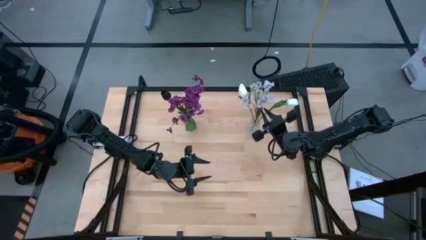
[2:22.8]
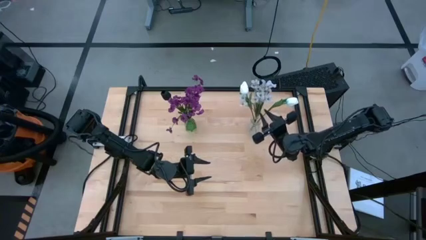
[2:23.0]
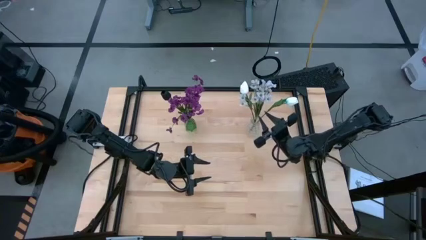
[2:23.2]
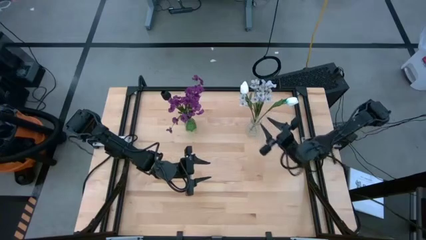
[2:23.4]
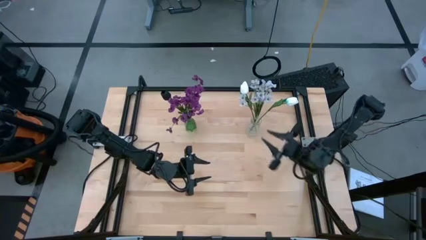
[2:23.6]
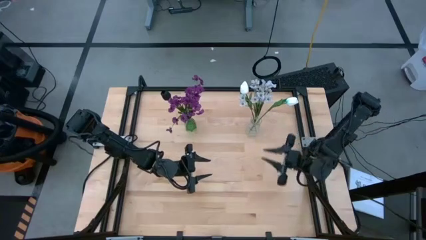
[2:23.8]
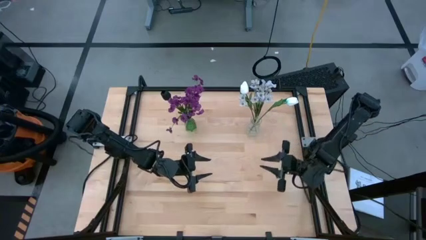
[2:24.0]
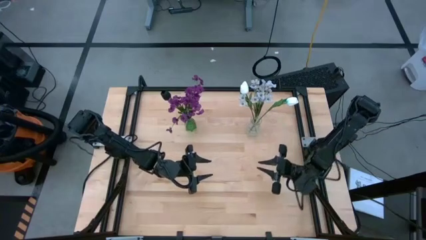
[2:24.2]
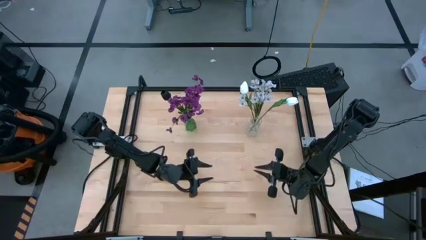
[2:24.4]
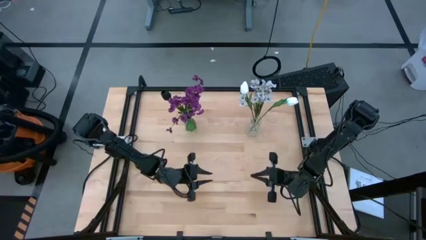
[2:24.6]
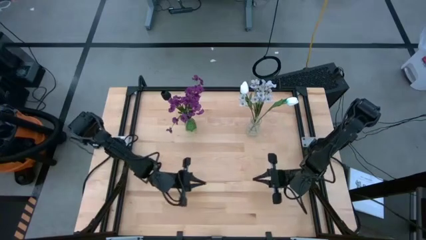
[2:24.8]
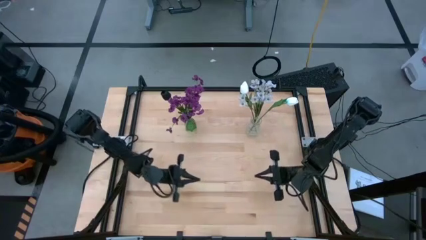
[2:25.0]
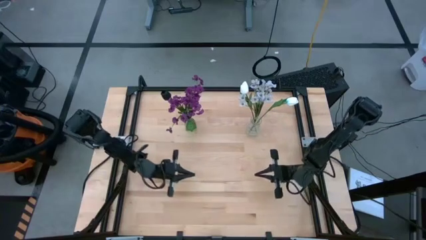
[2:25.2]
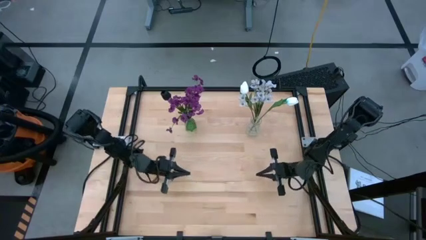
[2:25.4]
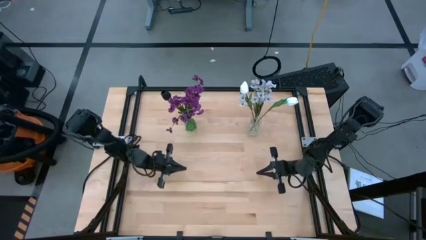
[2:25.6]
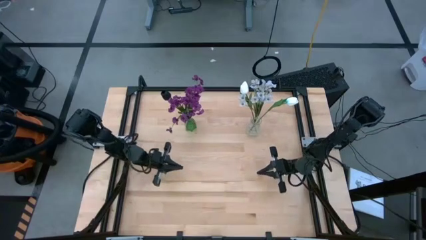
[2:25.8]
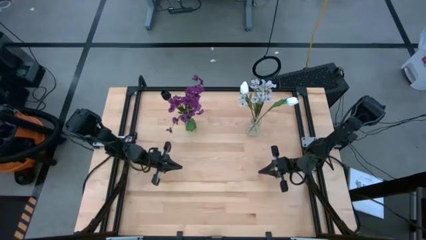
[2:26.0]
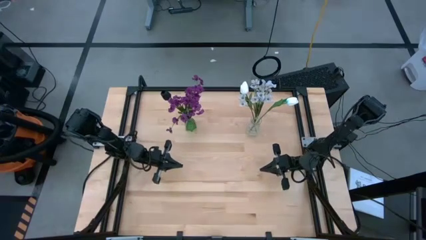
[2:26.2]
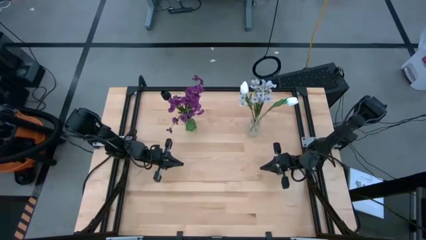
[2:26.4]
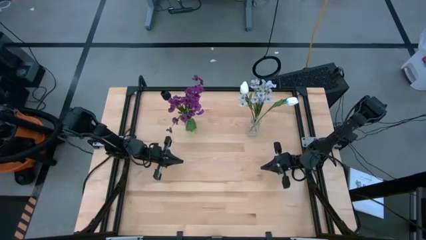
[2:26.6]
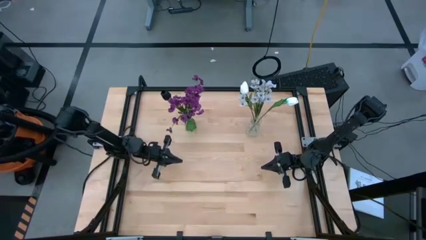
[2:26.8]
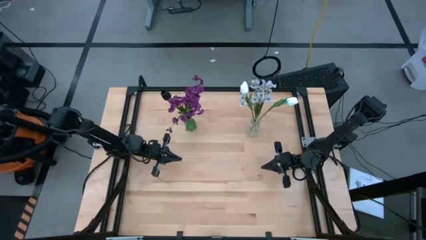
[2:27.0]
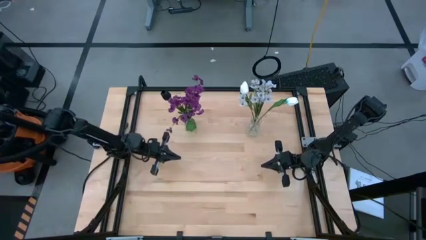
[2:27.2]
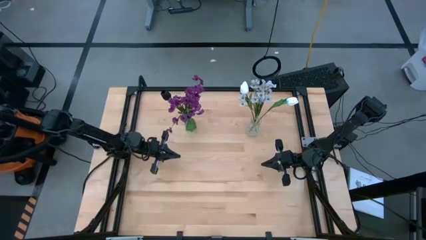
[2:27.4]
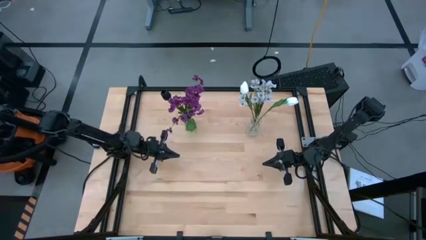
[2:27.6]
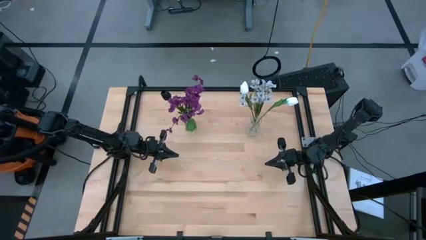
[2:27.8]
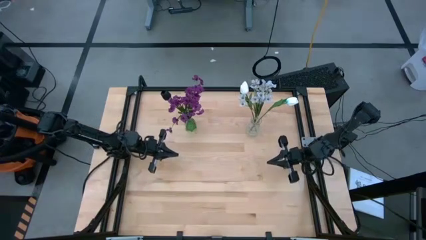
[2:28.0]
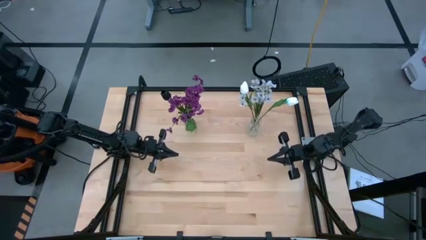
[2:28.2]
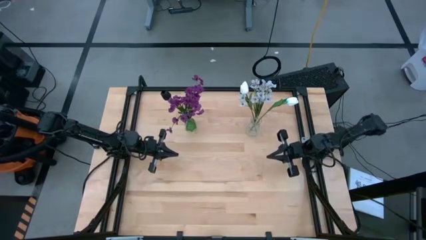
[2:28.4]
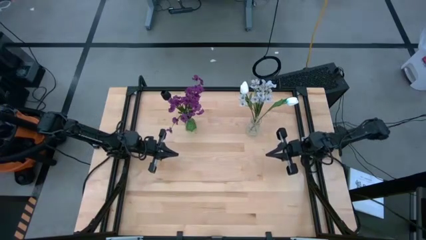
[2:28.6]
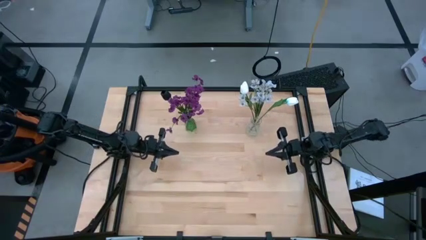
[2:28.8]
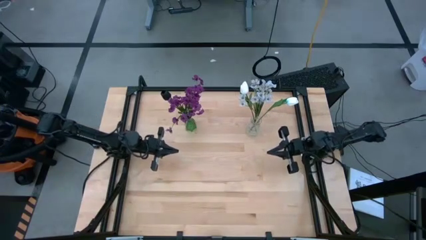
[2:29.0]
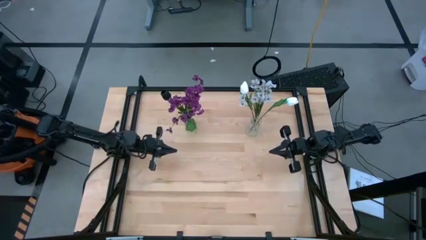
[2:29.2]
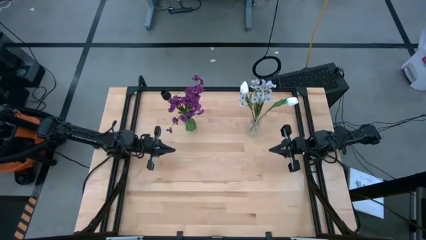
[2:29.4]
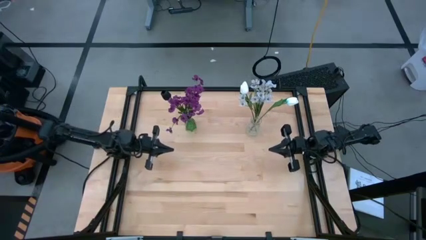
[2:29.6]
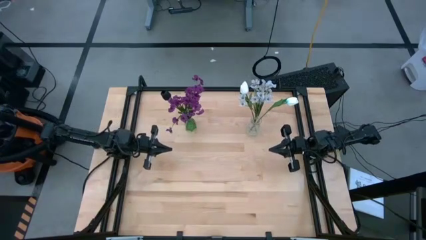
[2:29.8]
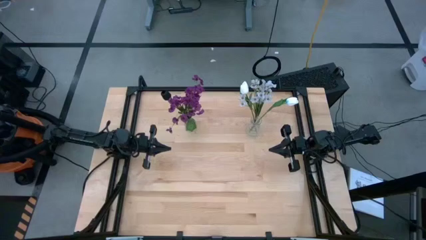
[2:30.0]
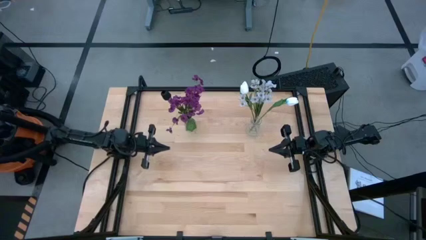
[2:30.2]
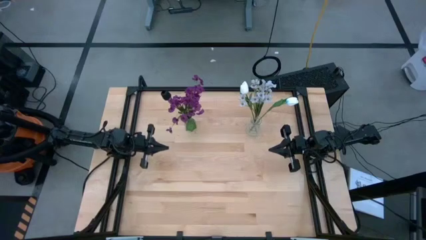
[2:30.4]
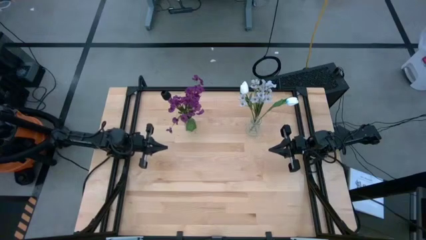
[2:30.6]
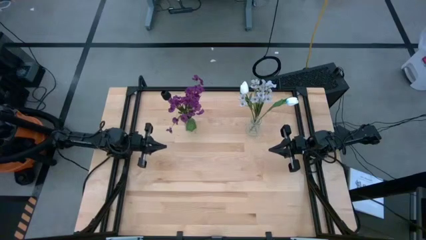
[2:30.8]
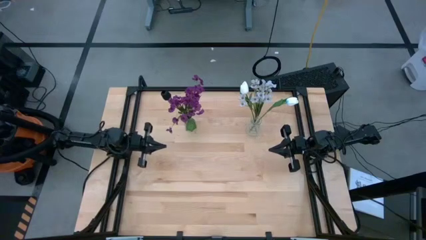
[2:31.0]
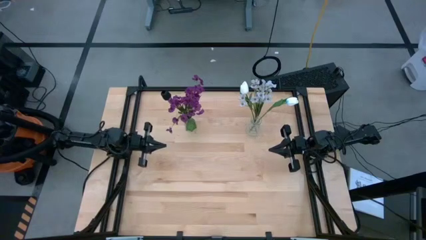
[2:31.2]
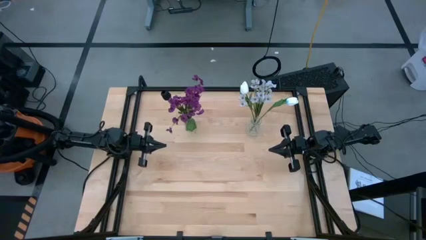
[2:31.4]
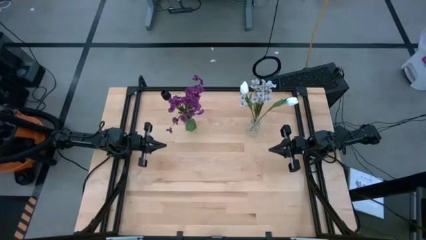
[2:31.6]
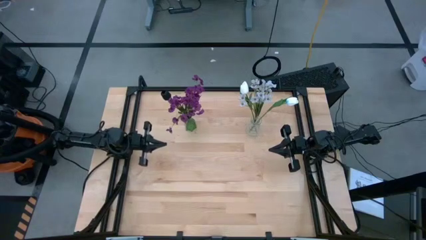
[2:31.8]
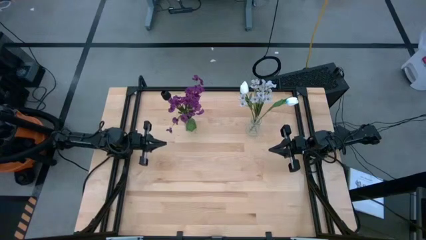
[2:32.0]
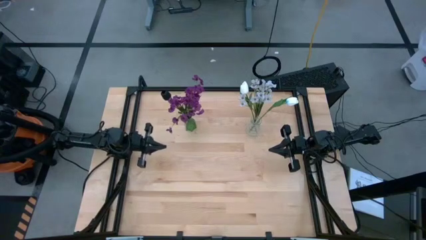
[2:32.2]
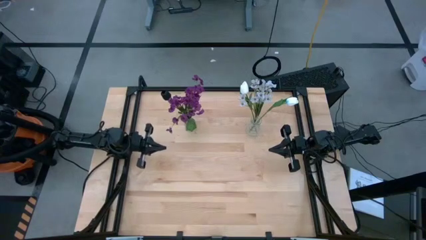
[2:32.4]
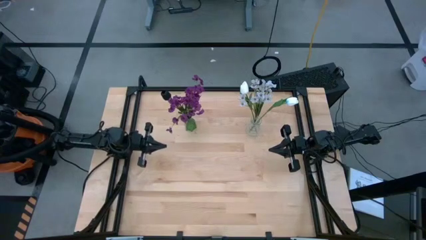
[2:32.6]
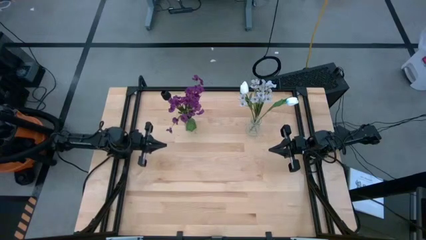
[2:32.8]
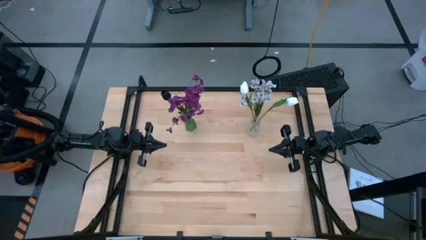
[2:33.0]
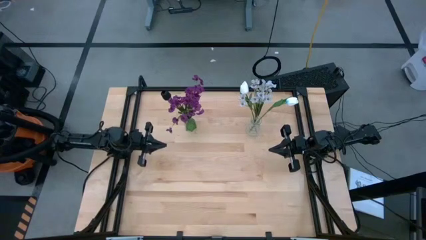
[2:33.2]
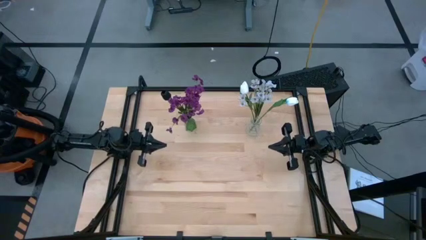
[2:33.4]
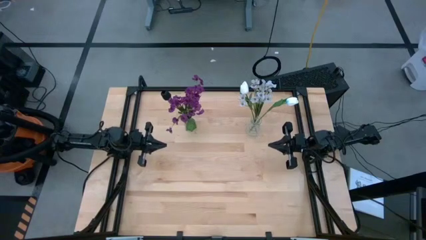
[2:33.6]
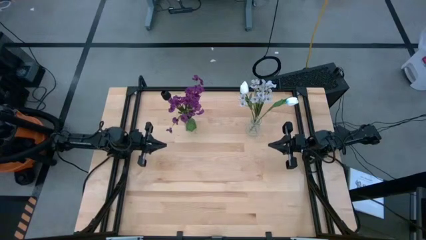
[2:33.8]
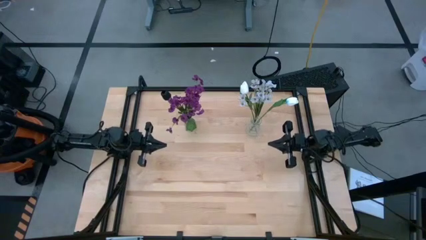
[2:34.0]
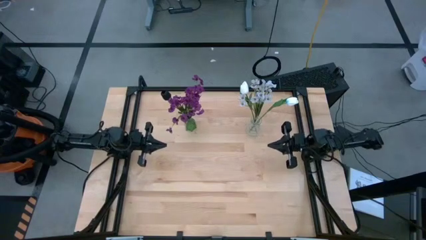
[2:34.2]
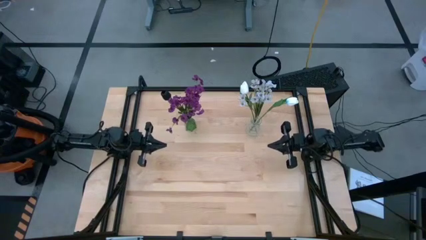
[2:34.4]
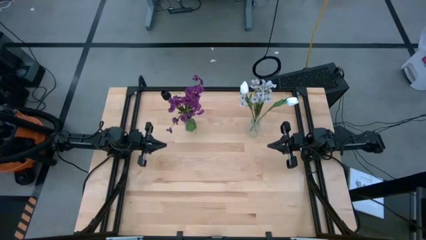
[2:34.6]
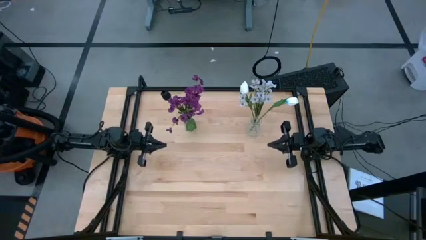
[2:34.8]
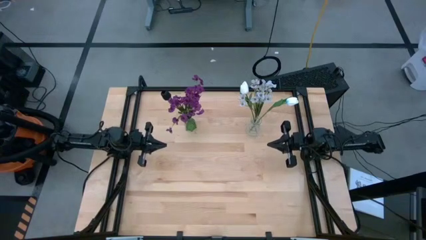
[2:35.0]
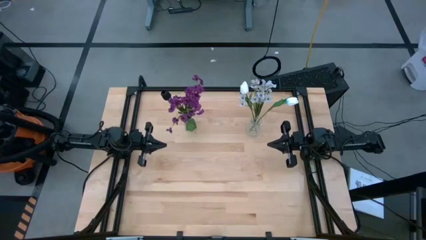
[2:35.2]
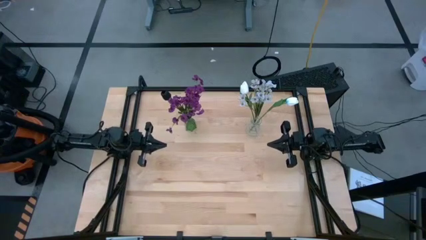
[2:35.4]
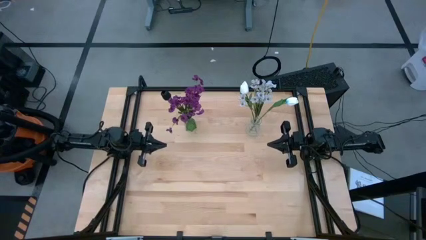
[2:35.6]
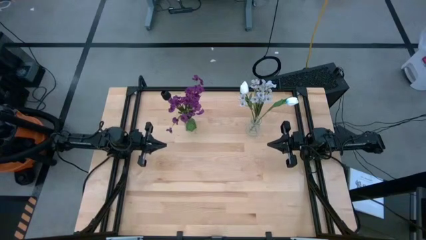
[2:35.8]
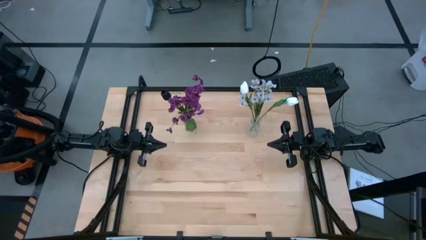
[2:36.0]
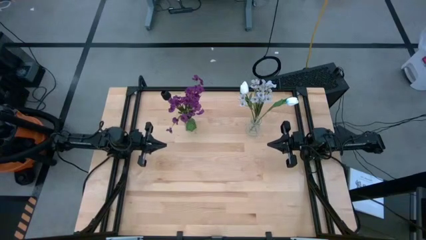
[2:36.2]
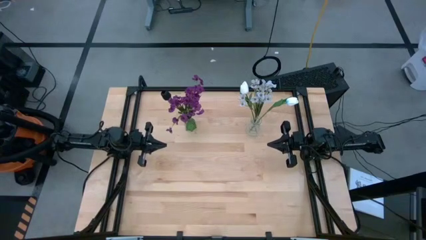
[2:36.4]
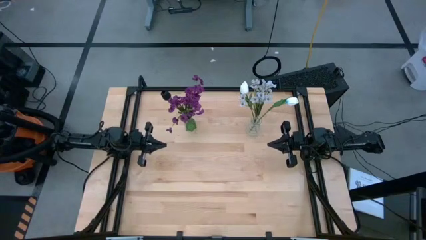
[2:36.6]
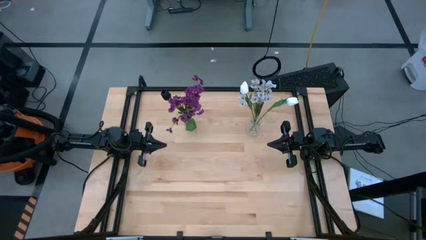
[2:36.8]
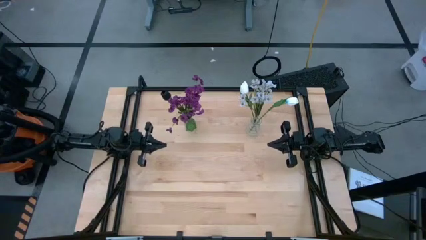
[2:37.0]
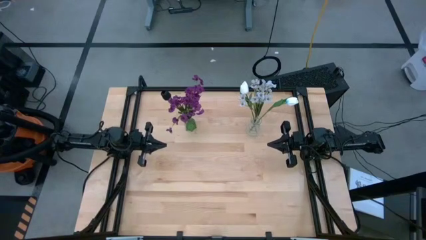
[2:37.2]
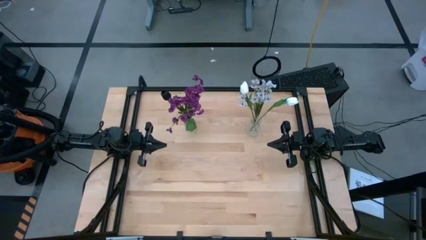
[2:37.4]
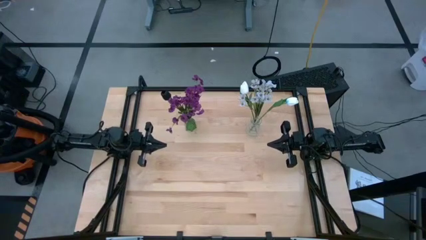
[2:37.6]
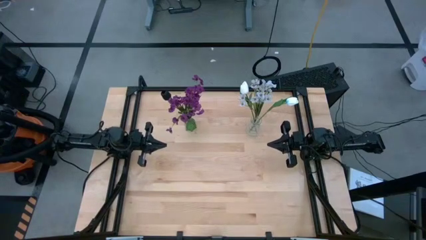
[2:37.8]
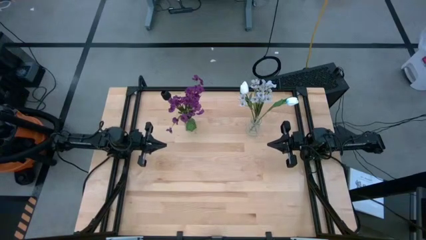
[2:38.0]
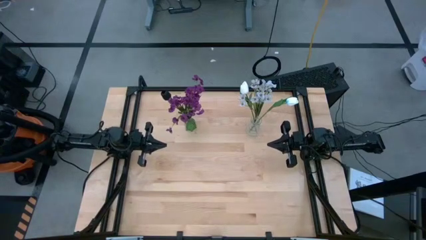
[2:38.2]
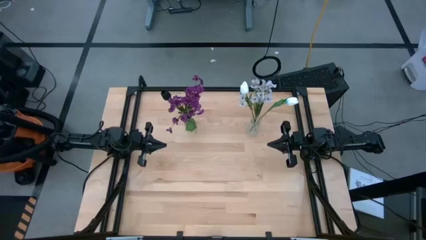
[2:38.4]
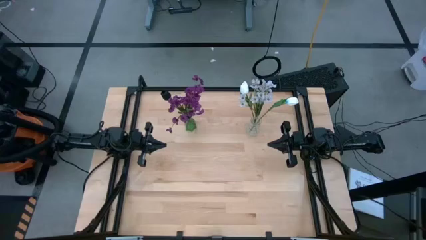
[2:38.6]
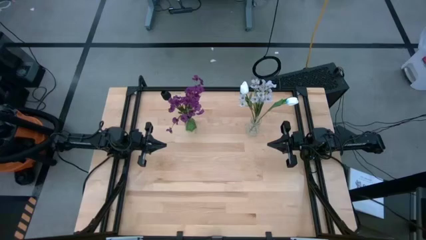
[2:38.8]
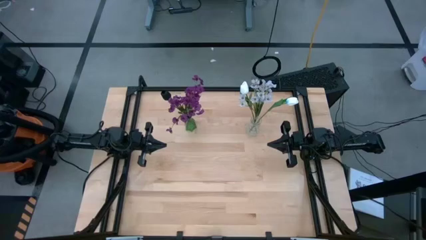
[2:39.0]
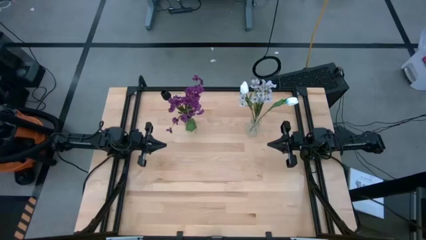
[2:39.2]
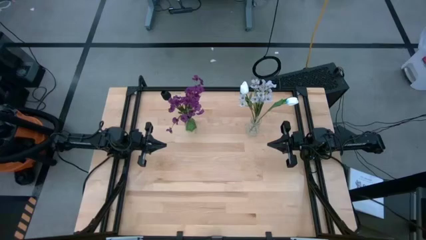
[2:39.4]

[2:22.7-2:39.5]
Task: Sort flowers into vase by color
Return to Home Position
